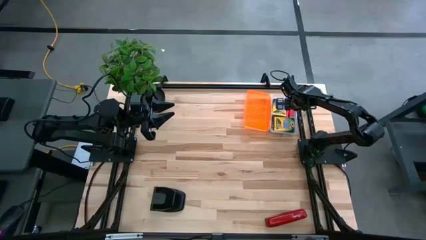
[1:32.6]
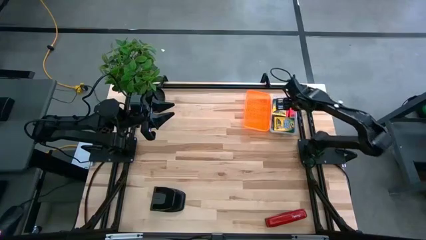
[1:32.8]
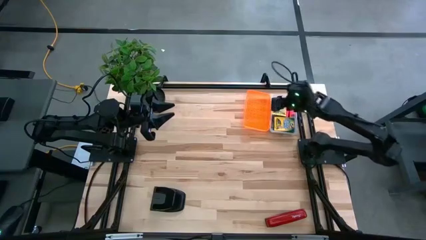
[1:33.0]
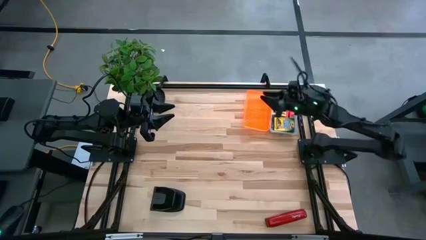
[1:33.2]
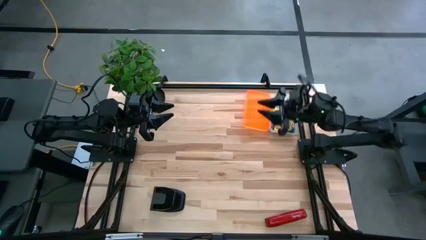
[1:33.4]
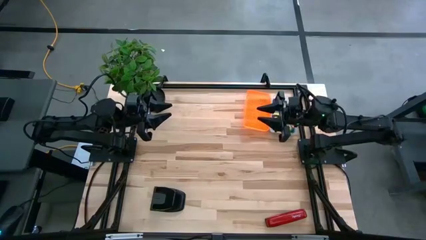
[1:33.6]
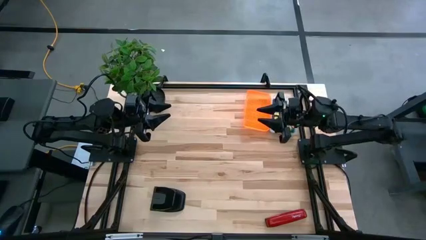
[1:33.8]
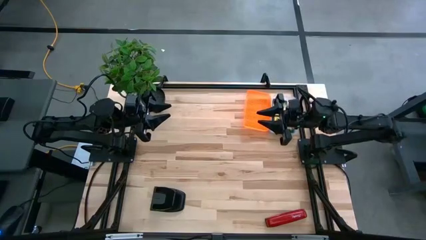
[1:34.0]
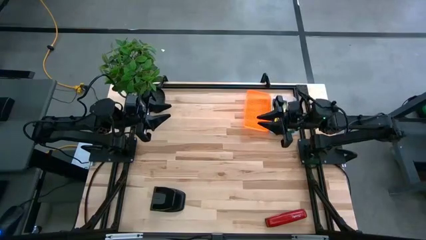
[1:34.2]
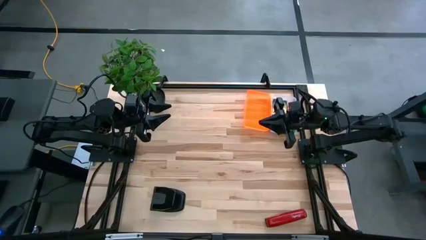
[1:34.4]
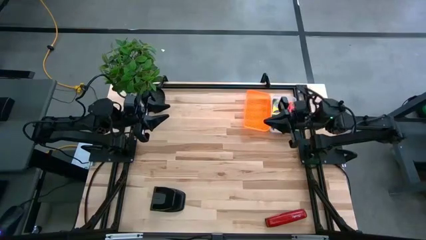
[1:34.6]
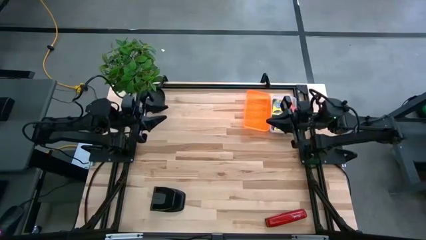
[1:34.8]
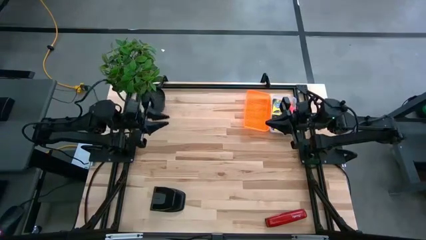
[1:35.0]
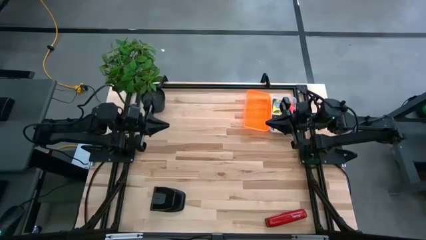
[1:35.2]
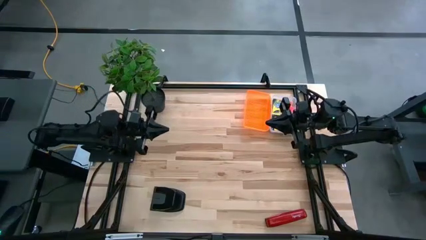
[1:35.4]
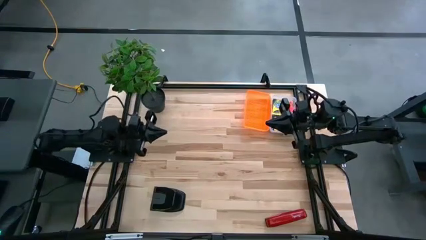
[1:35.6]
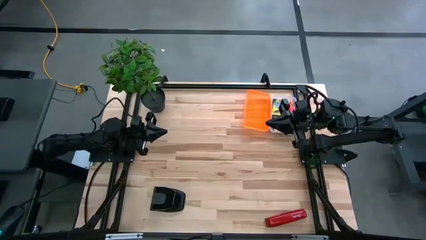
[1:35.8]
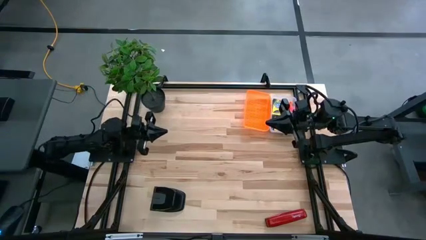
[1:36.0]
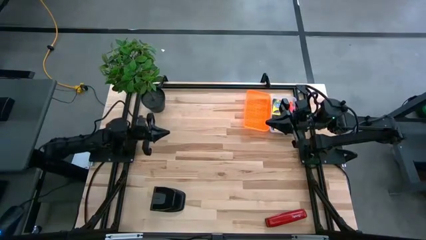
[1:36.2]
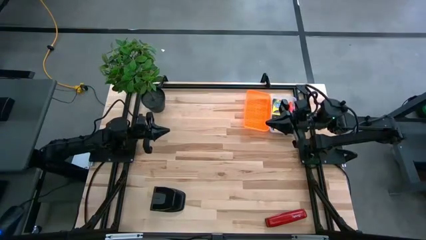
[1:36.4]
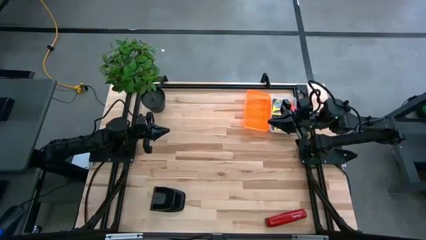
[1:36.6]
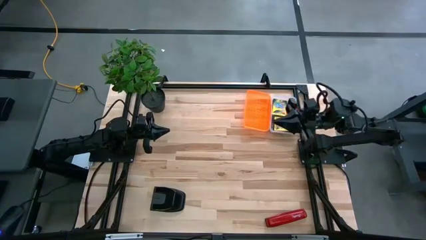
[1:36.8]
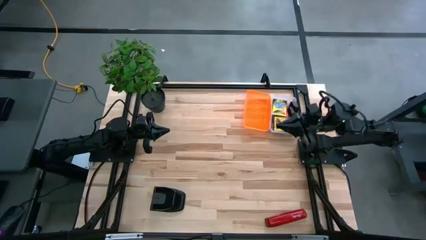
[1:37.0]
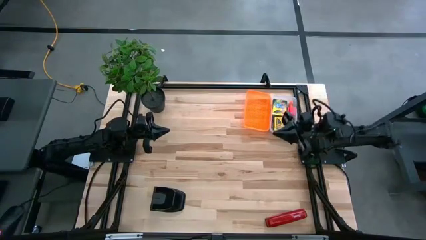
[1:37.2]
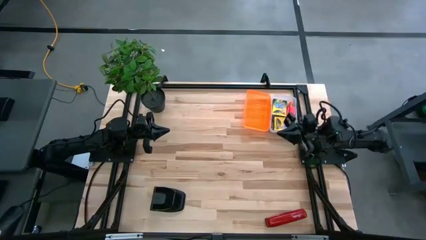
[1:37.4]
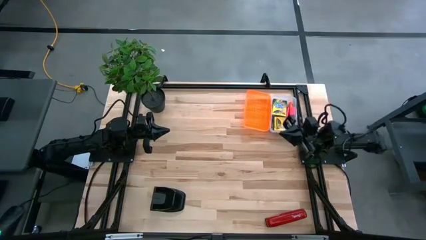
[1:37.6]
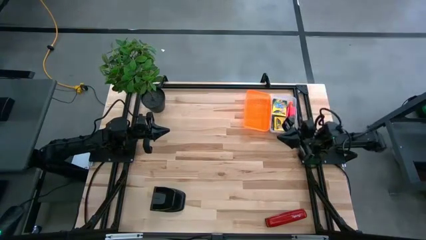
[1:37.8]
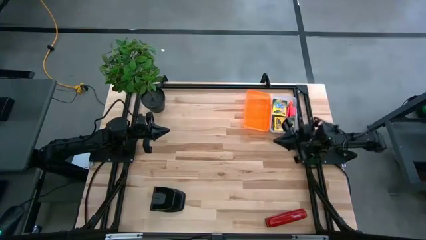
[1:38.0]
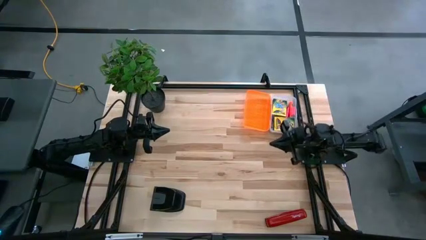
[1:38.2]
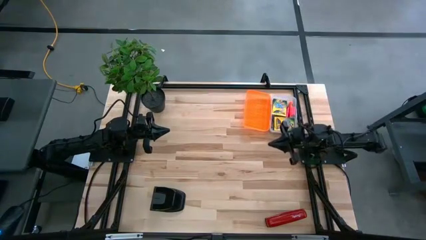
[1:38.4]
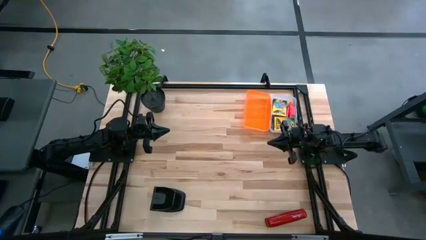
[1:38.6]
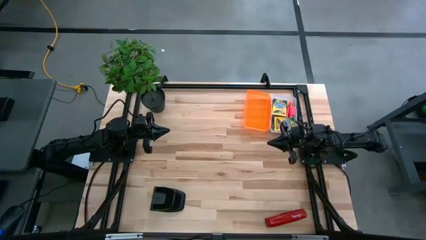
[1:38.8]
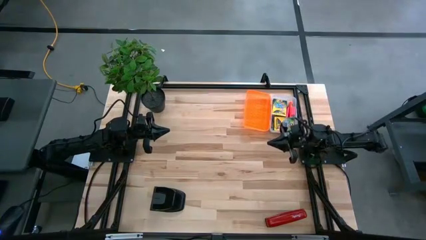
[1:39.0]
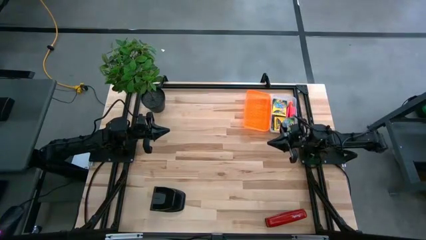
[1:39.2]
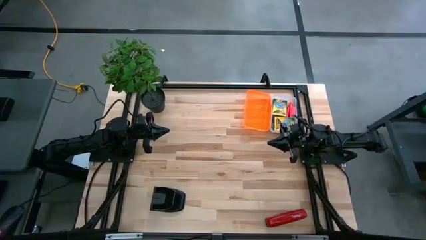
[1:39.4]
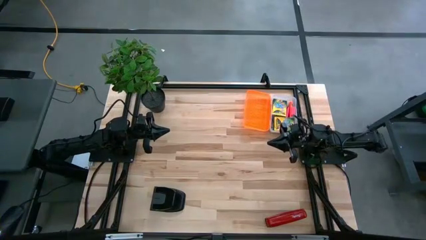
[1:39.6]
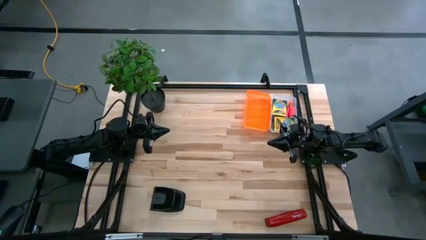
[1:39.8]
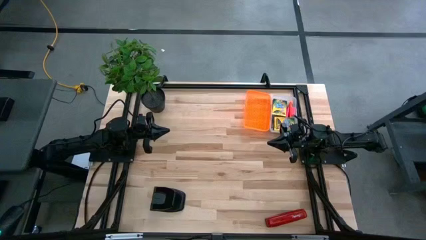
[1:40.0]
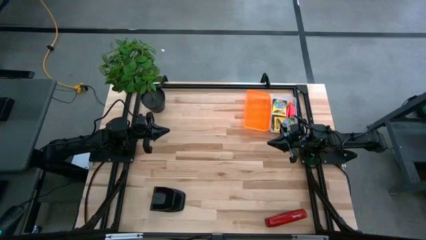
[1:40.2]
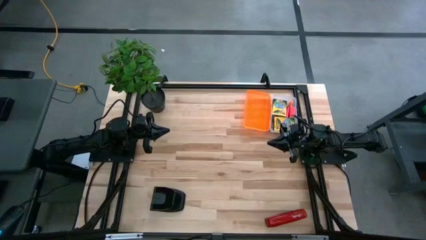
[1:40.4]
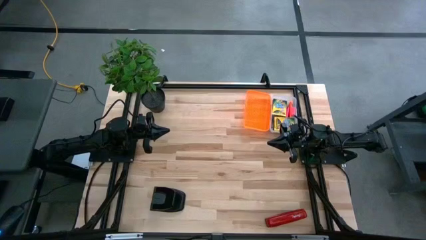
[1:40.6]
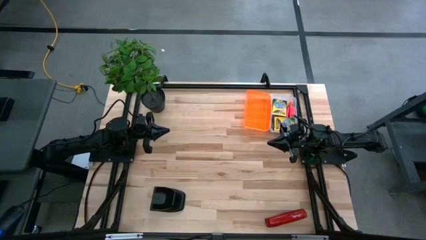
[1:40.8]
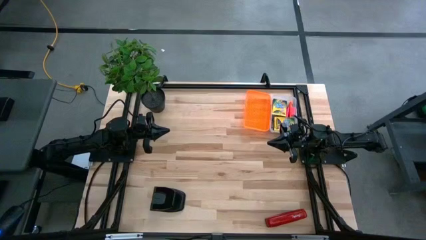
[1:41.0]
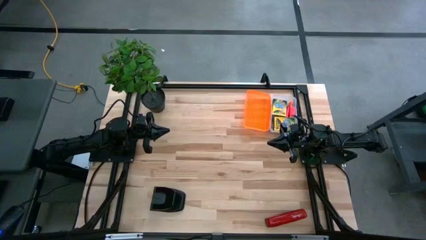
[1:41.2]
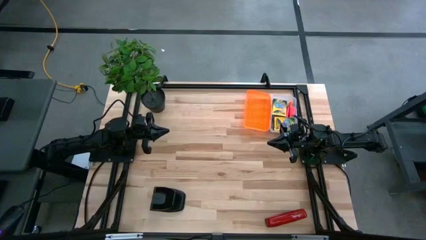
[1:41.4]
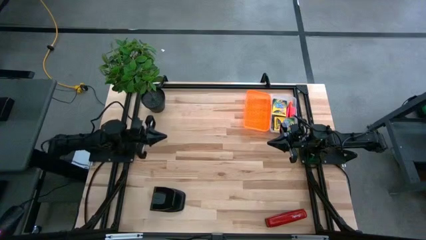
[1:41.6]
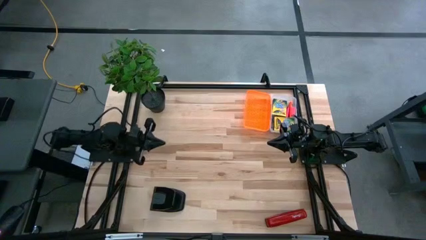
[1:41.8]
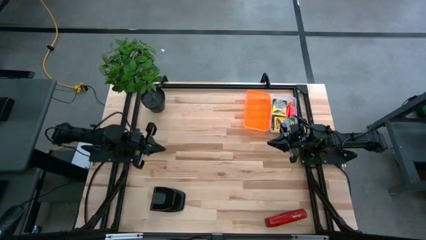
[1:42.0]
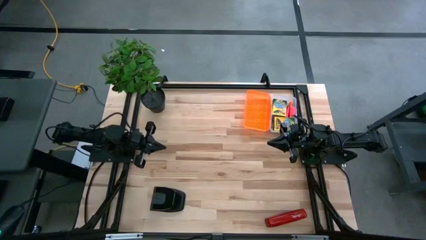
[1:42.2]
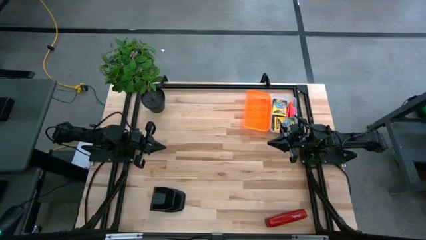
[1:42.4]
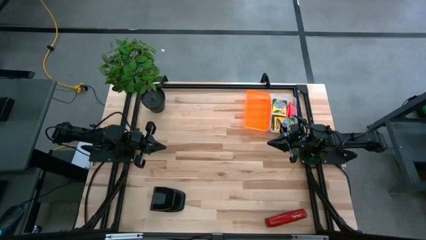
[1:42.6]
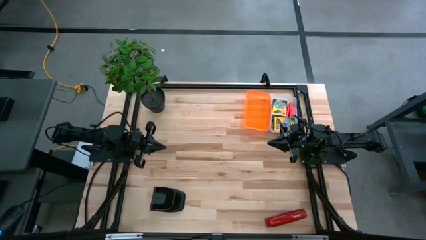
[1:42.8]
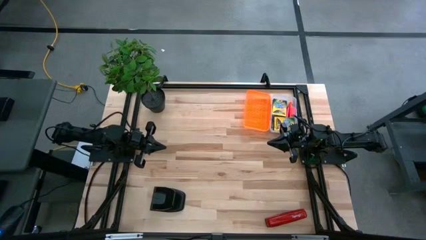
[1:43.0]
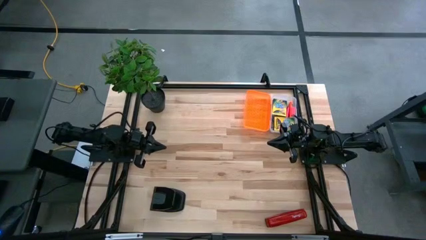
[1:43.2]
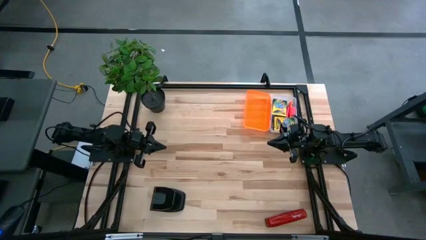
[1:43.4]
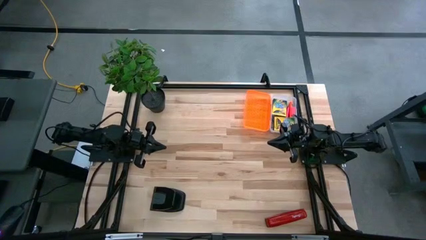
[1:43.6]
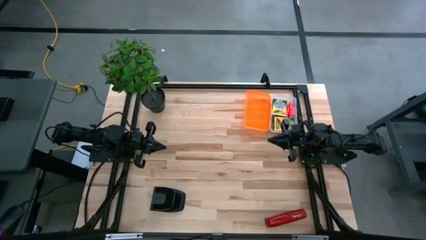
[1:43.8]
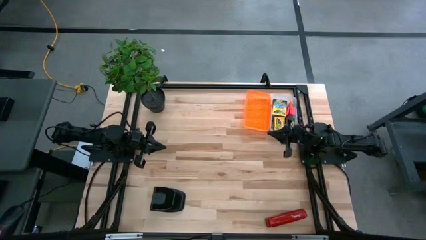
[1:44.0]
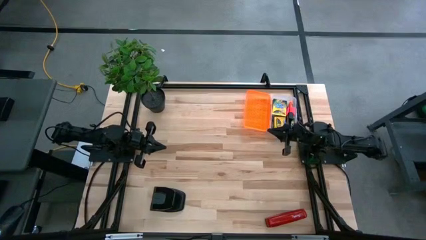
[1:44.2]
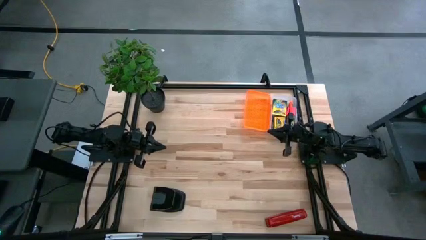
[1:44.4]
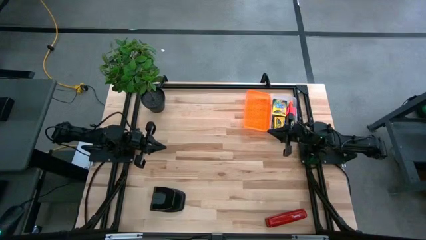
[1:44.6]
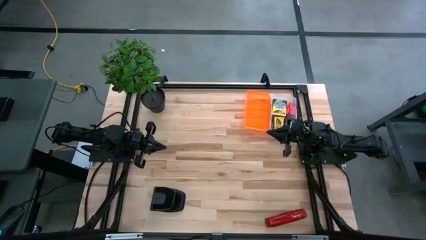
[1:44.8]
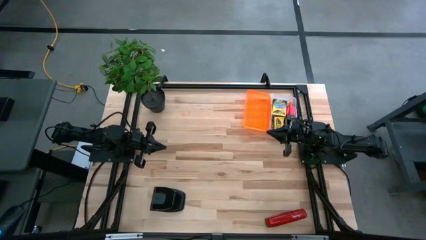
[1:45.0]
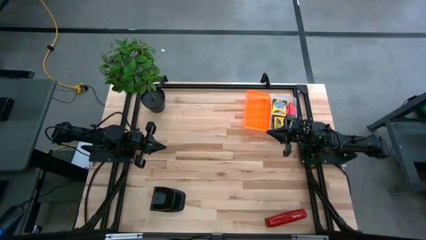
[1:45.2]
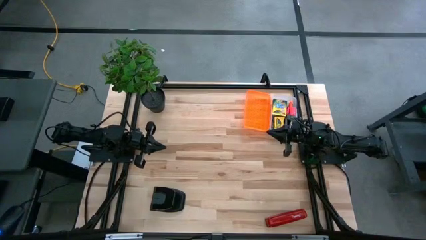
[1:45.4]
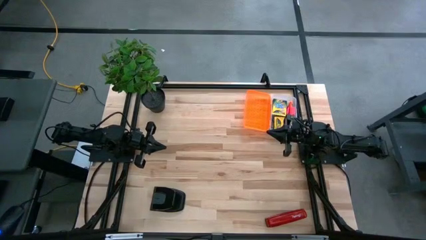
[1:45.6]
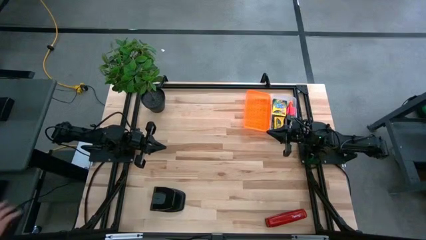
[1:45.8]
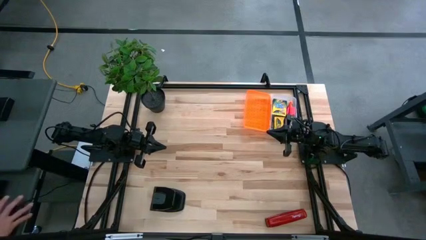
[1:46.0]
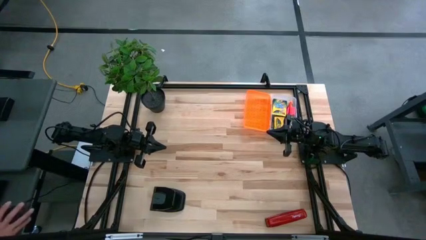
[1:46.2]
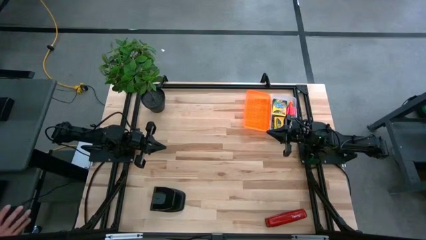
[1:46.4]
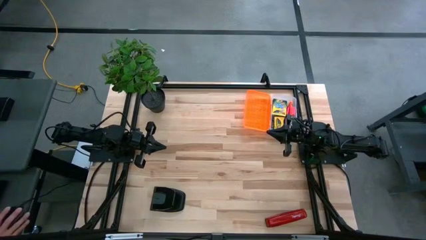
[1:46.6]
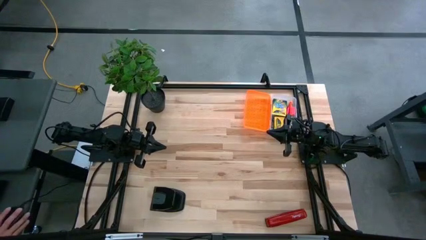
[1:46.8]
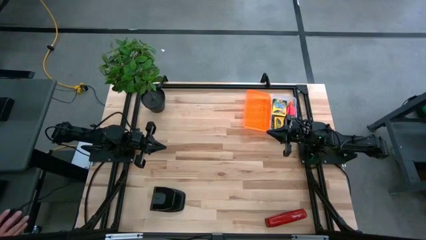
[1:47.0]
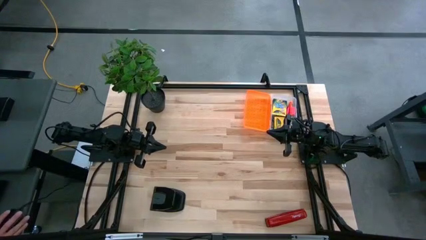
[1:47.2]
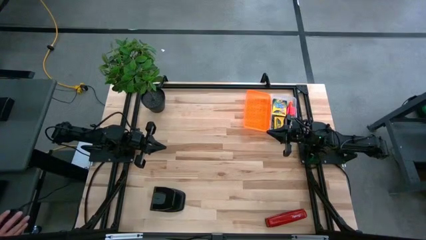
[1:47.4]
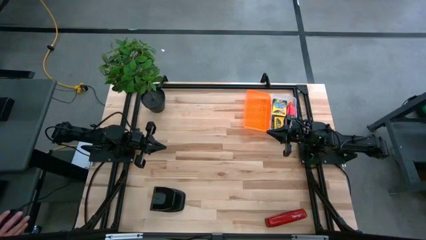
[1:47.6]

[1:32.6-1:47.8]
Task: Pack school essentials
Return to Home Position
